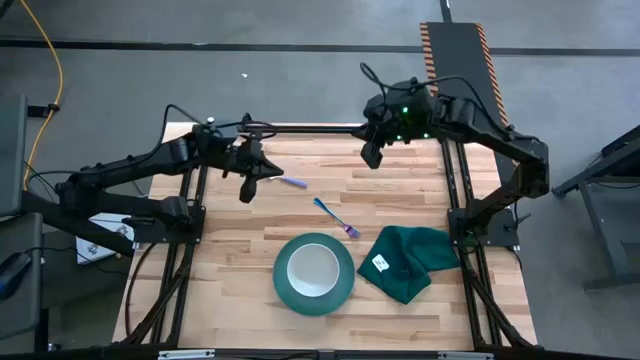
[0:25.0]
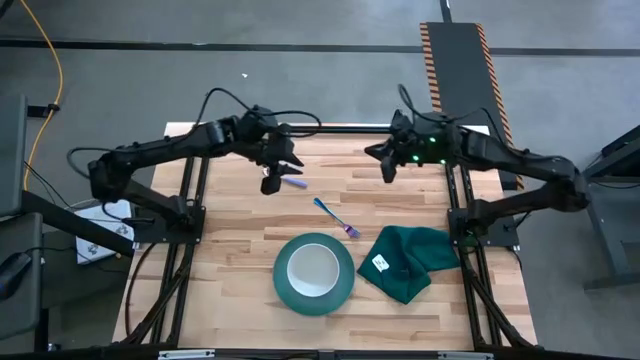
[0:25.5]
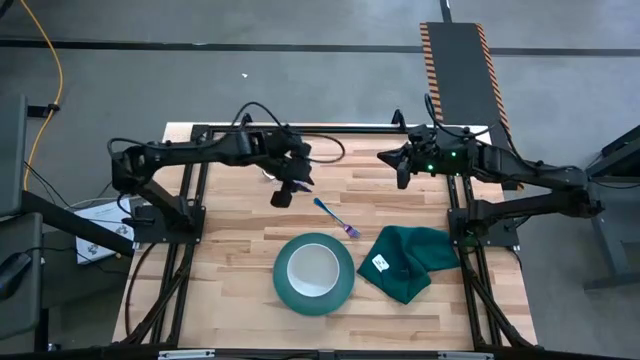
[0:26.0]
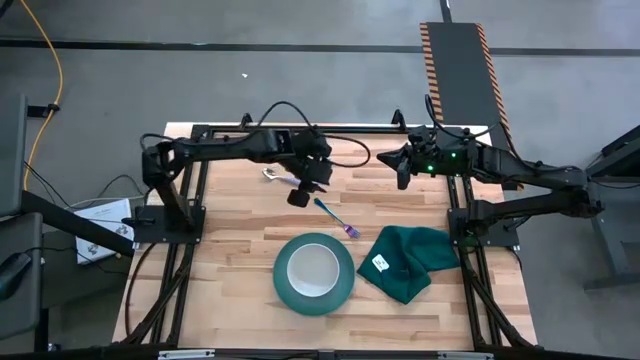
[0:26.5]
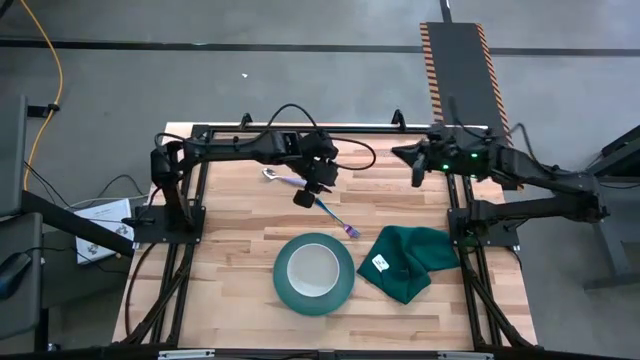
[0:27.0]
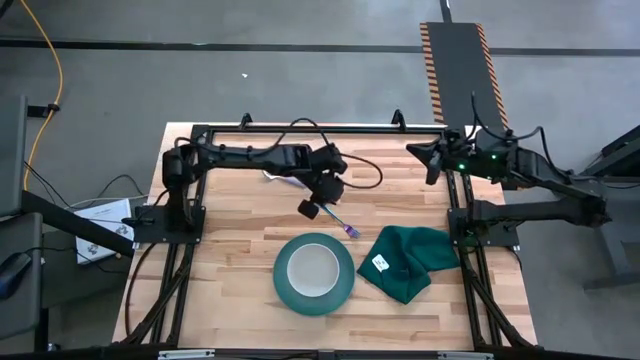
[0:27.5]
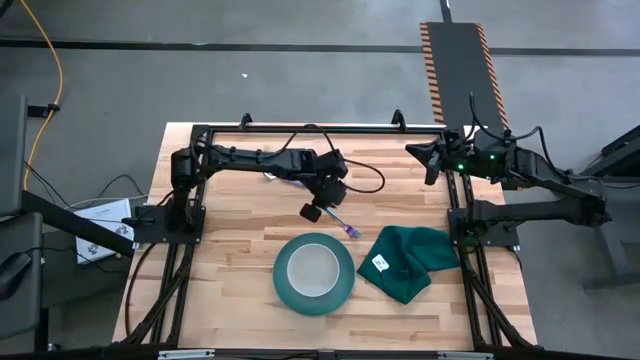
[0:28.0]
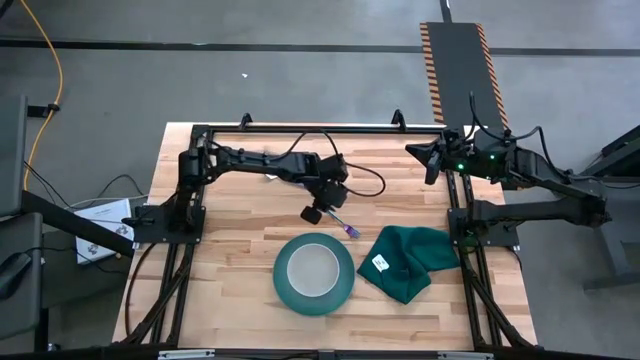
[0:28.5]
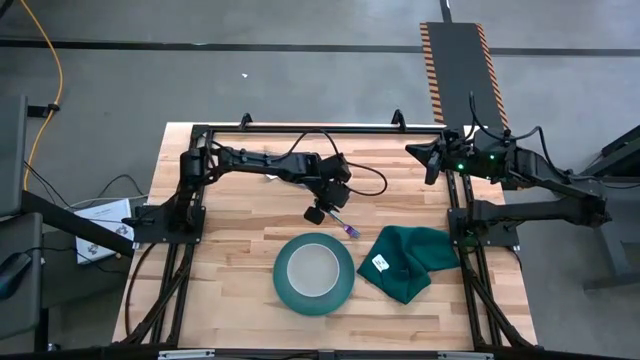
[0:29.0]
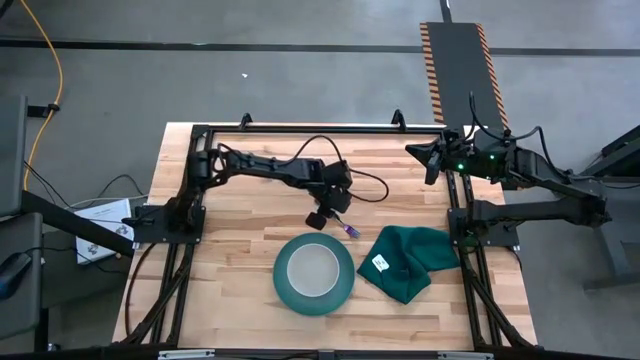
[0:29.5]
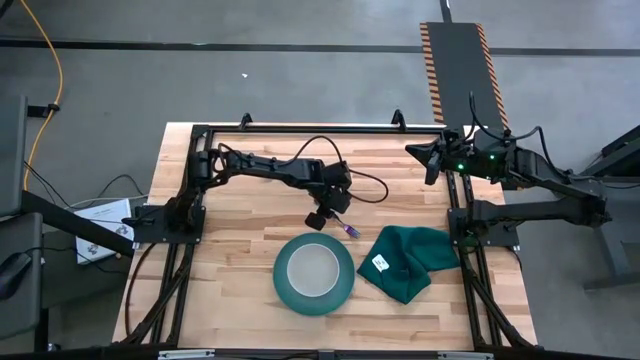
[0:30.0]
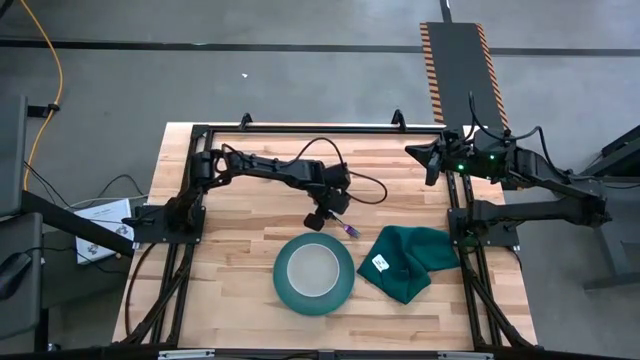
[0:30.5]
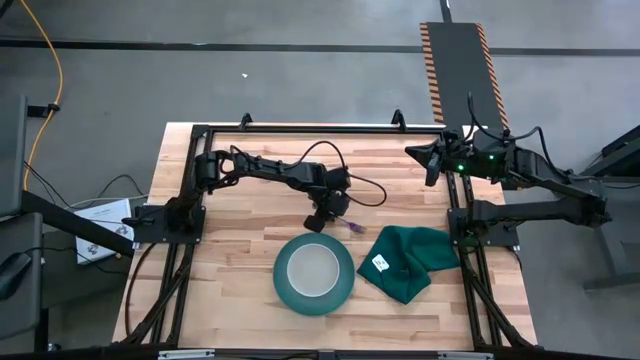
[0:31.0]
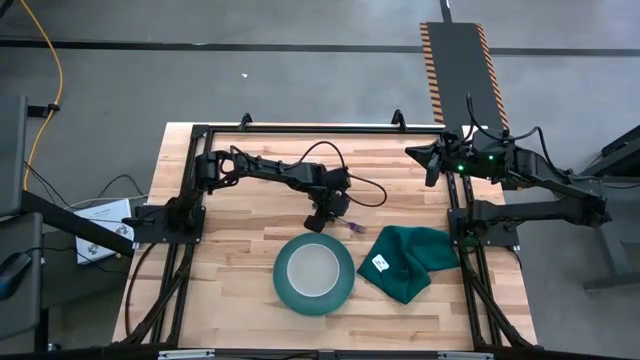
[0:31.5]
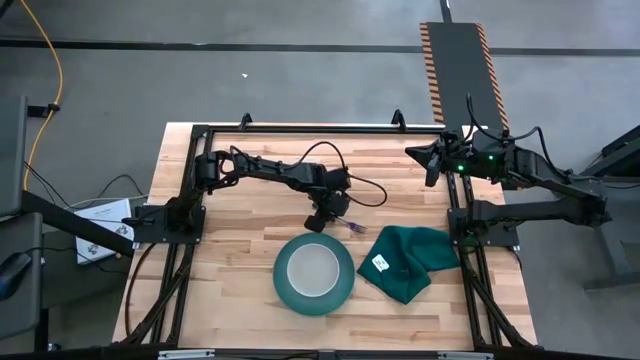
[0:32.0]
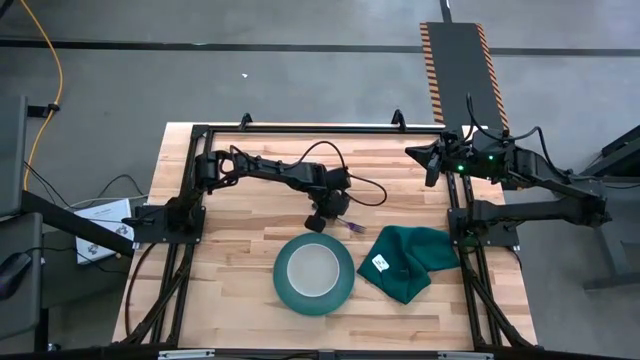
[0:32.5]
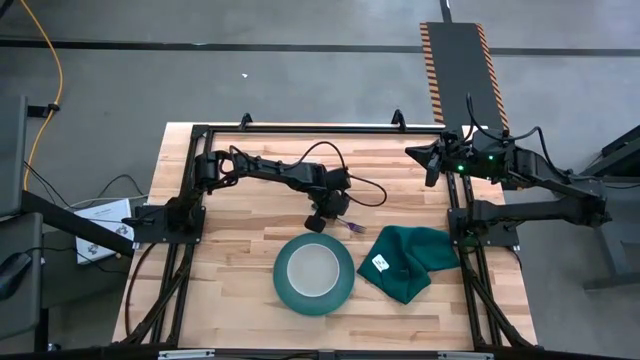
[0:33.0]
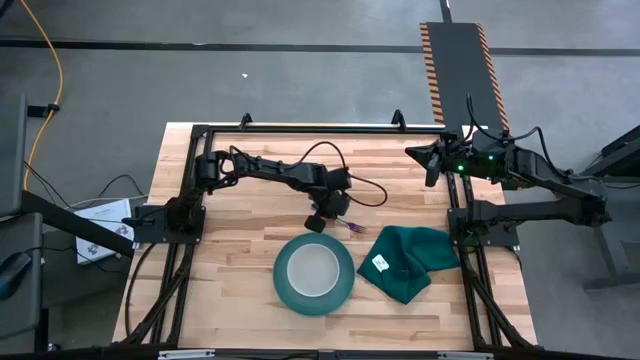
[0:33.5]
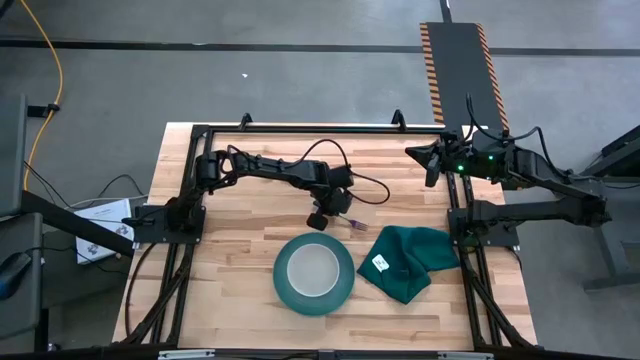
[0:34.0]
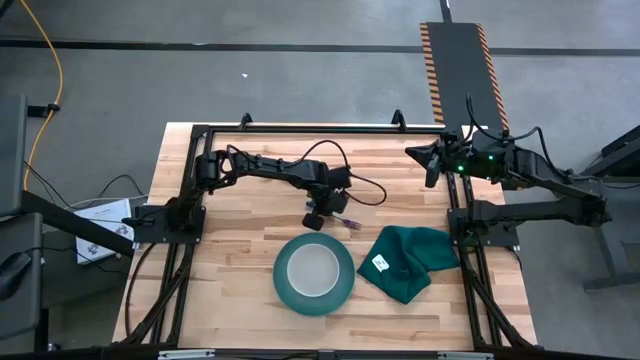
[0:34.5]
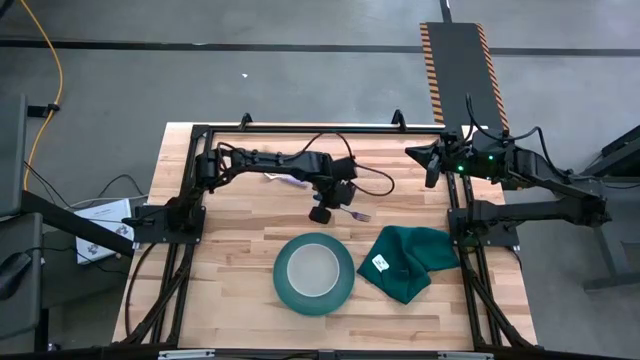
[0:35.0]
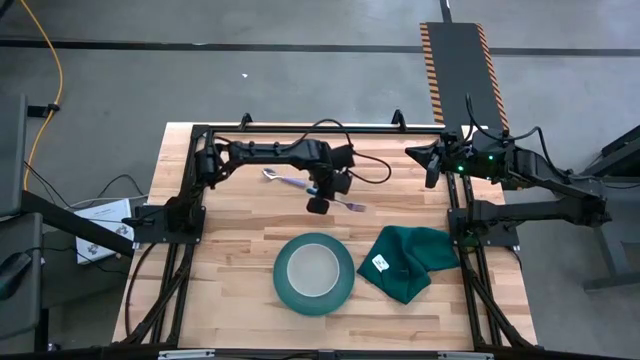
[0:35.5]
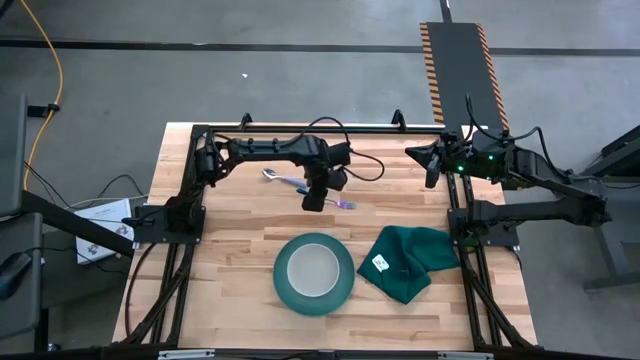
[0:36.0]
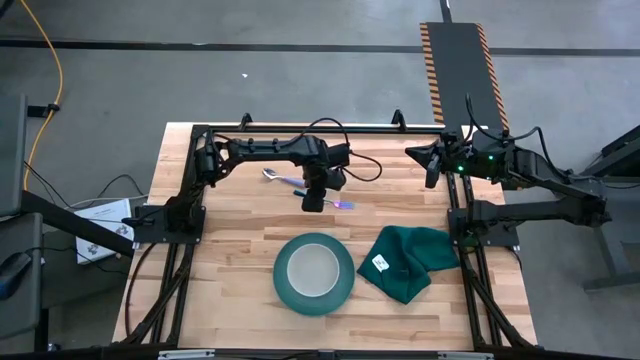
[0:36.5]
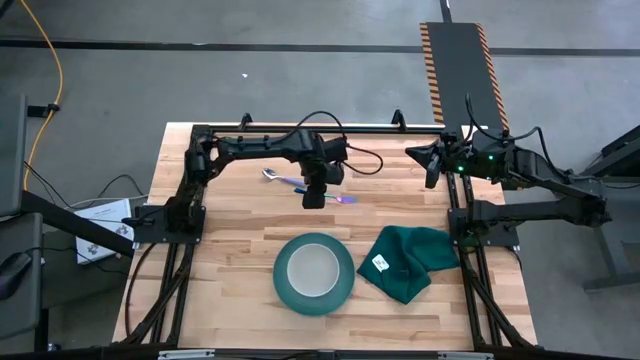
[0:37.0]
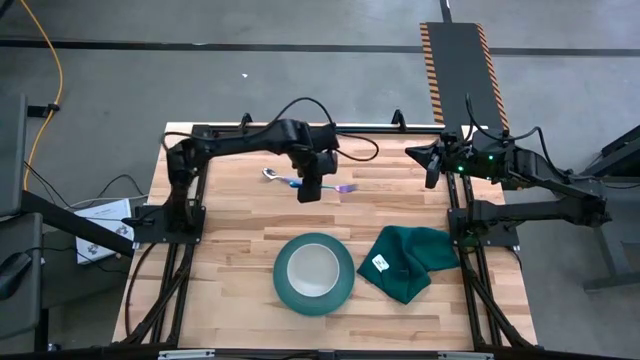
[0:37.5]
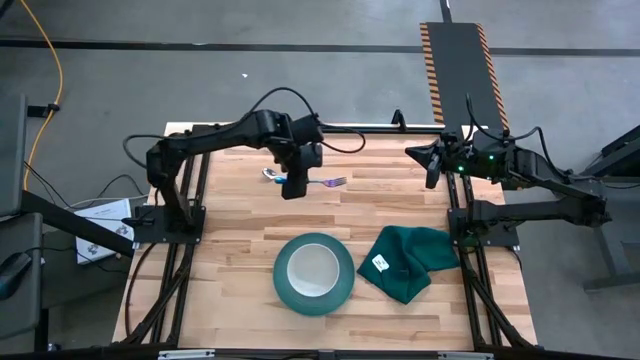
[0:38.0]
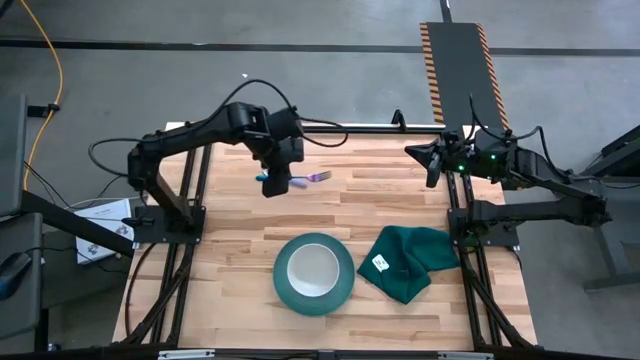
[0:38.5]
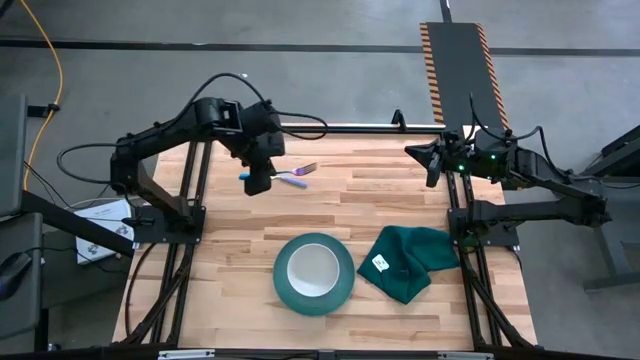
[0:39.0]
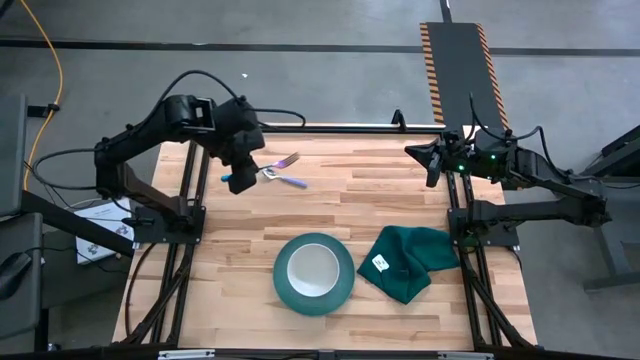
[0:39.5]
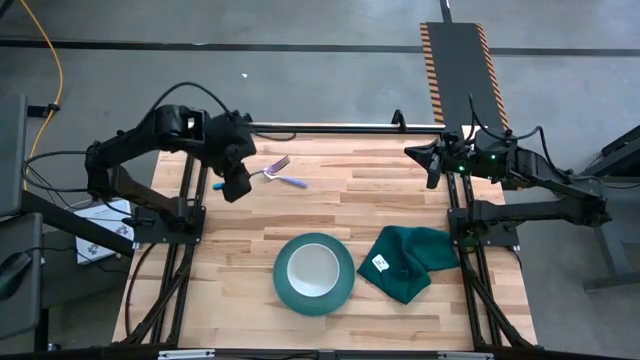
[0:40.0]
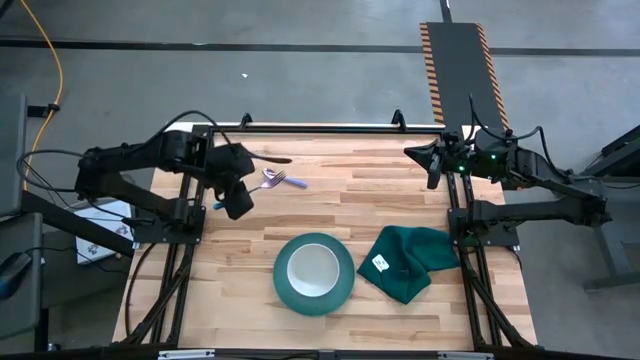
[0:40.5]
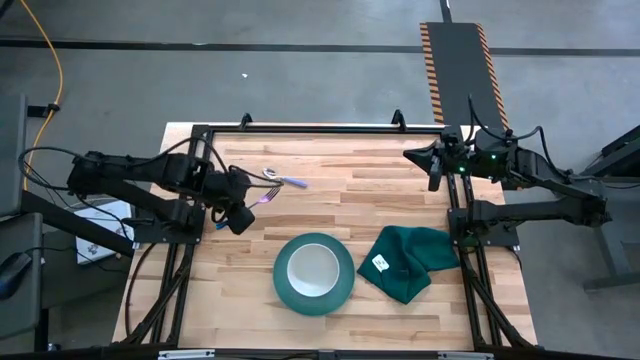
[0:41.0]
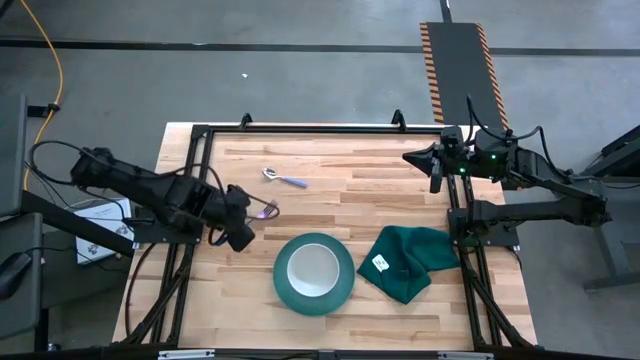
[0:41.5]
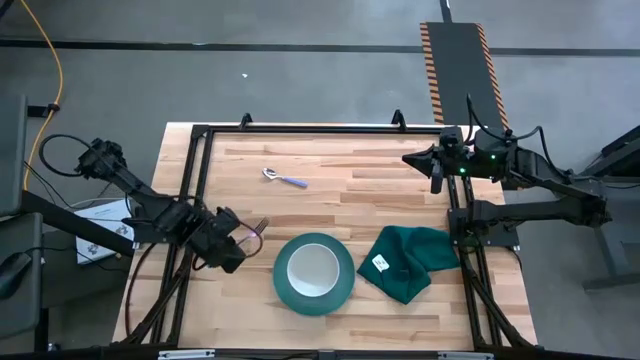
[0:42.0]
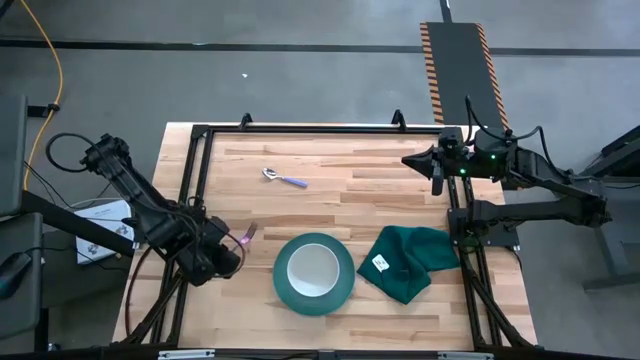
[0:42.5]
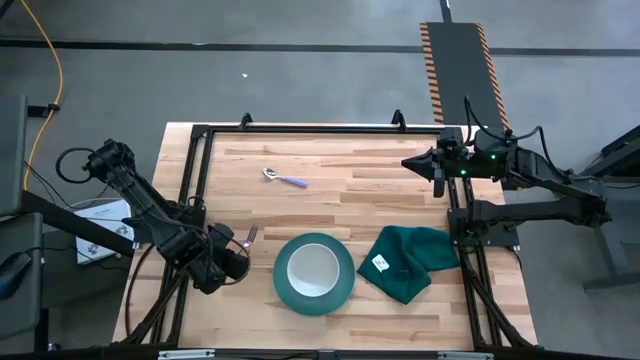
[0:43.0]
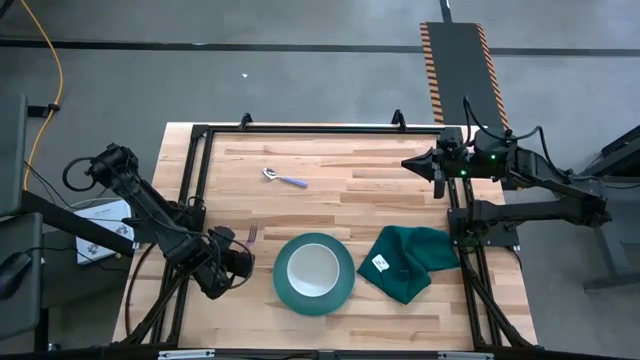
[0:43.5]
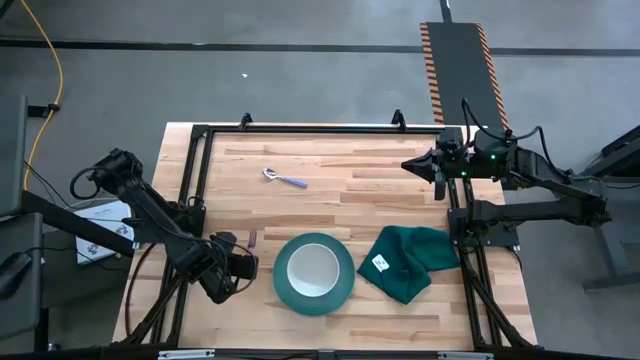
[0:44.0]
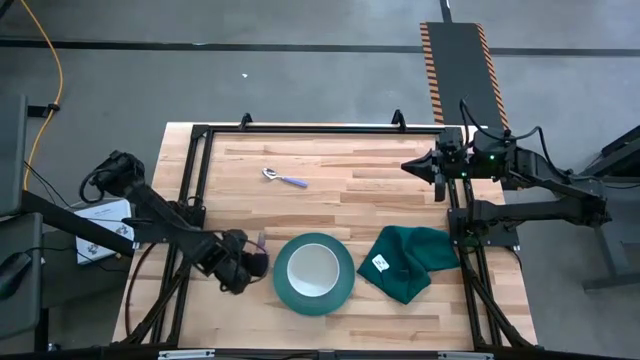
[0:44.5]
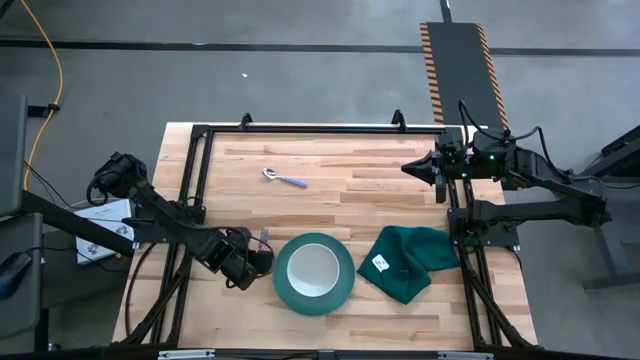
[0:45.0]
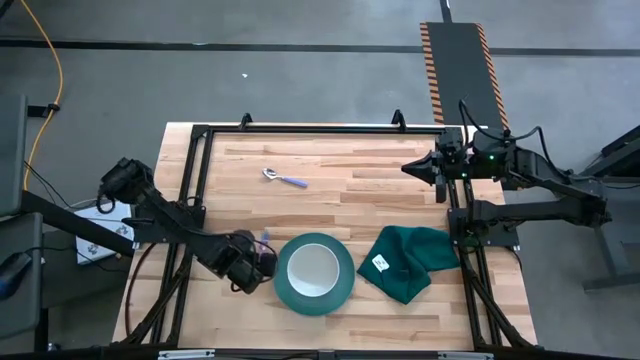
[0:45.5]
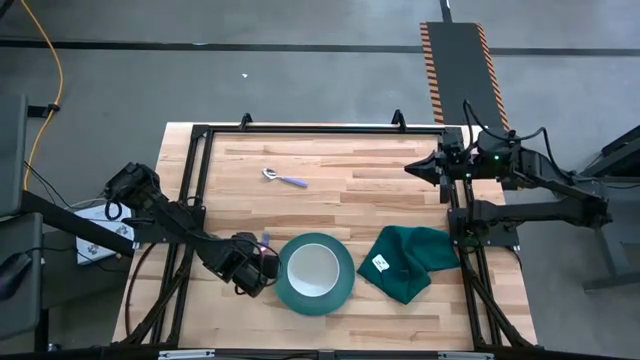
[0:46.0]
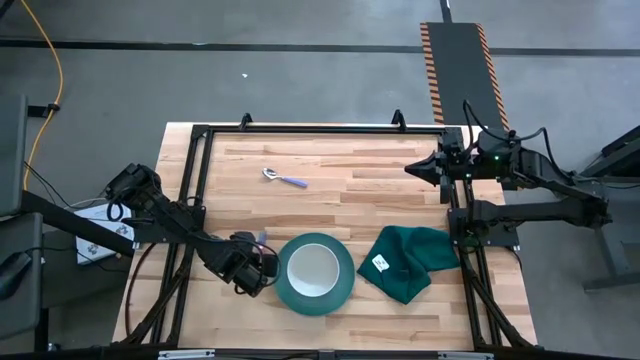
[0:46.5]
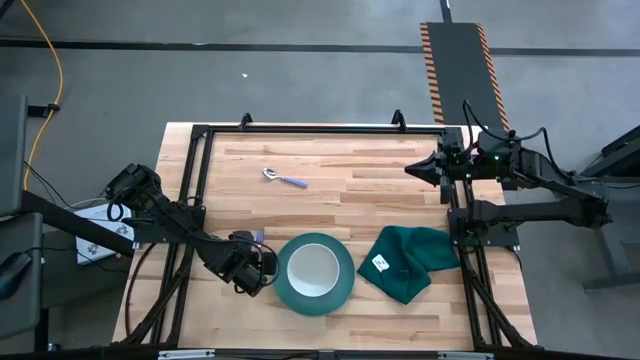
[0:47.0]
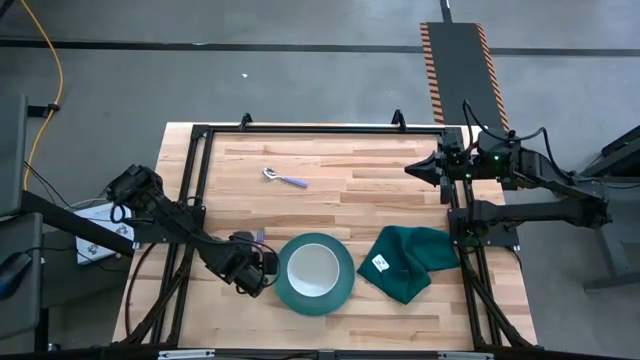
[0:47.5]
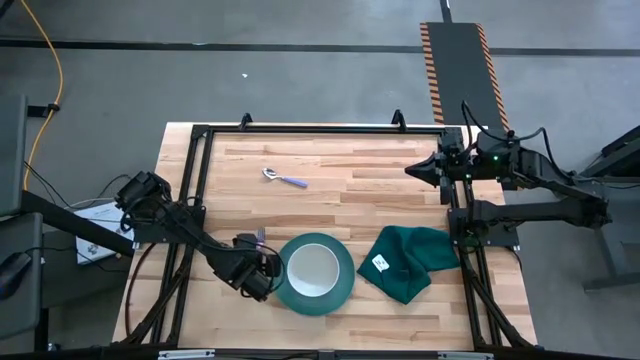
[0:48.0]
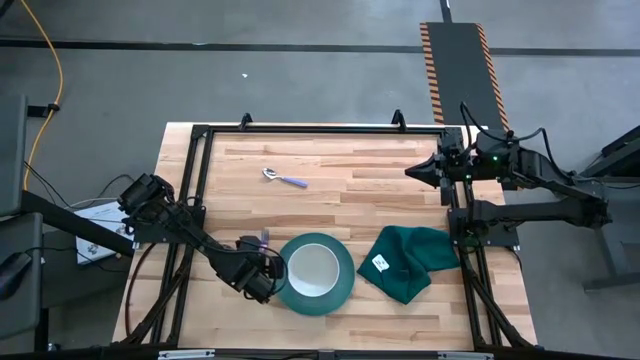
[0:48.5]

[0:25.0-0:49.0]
Task: Set table place
Place the purple fork inside the white bowl
